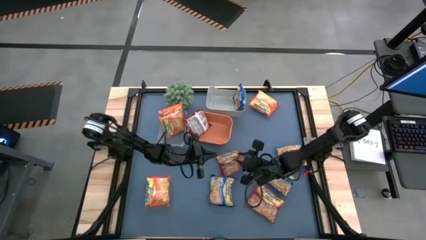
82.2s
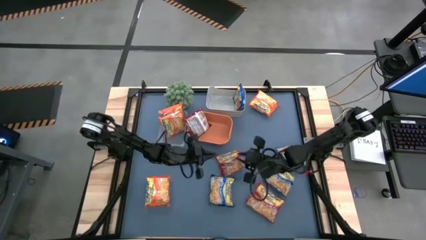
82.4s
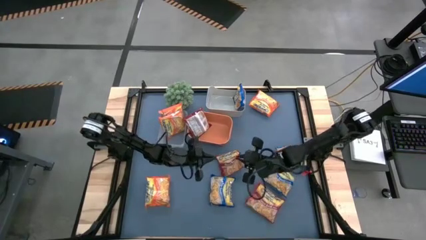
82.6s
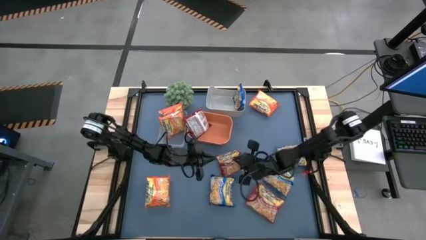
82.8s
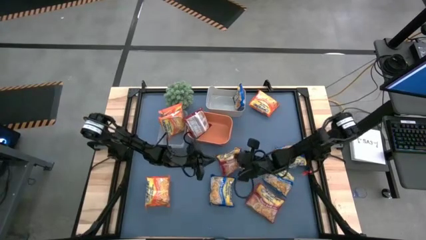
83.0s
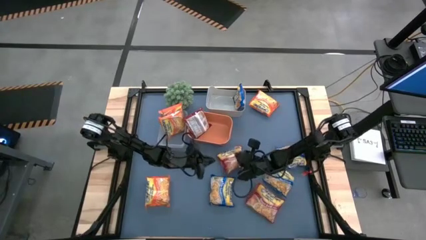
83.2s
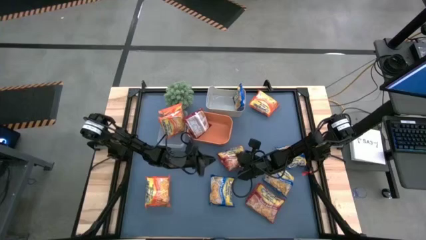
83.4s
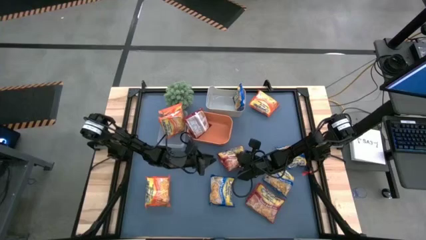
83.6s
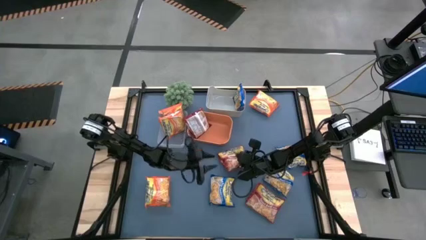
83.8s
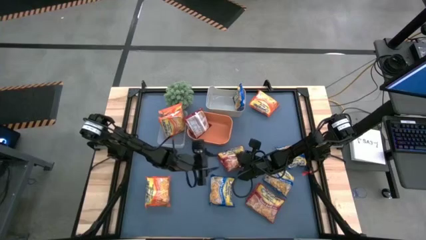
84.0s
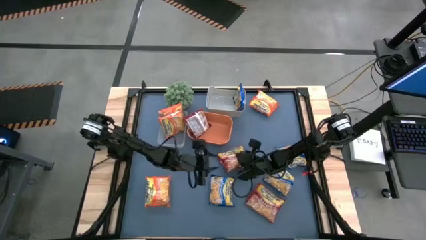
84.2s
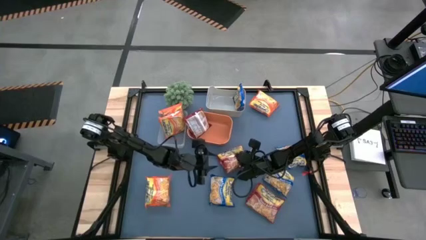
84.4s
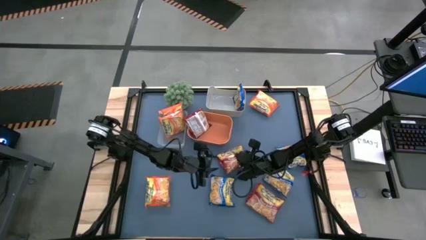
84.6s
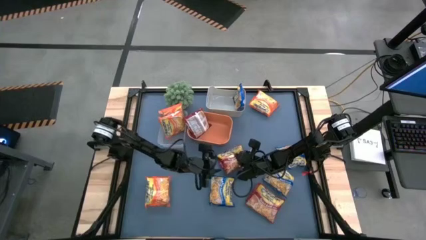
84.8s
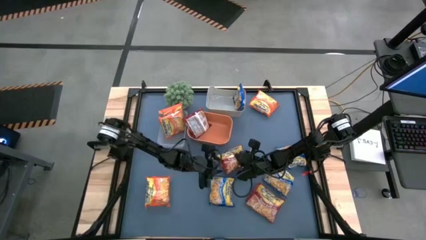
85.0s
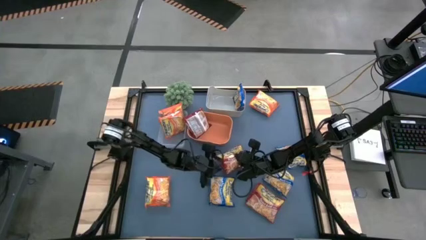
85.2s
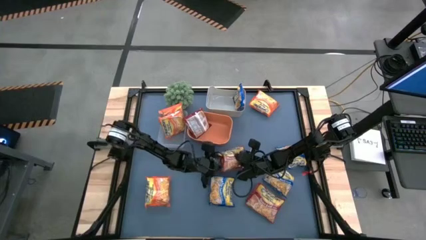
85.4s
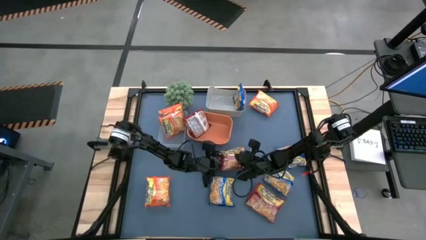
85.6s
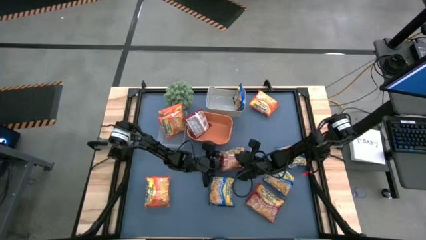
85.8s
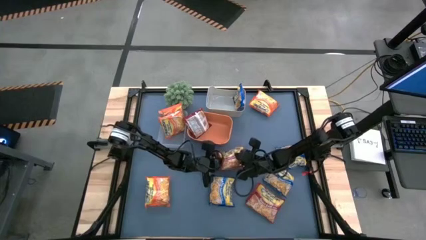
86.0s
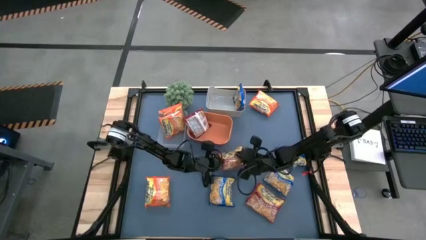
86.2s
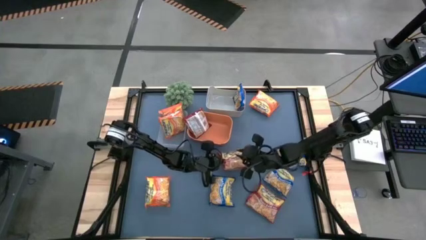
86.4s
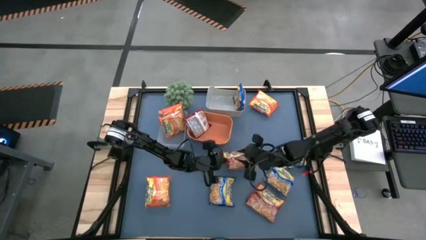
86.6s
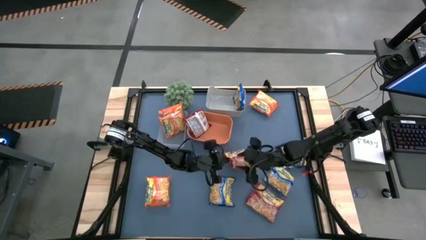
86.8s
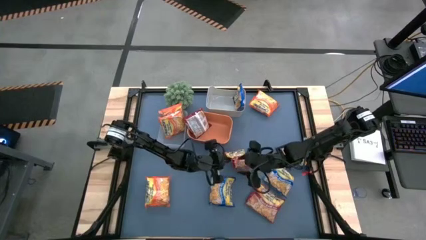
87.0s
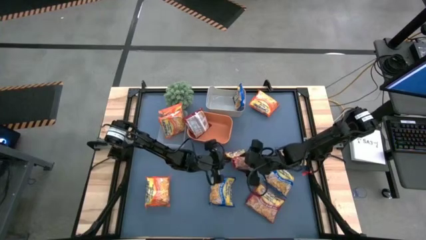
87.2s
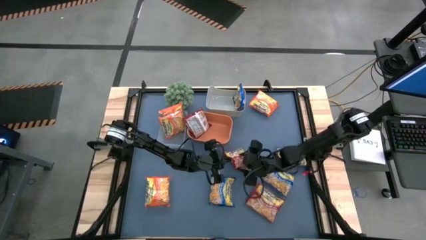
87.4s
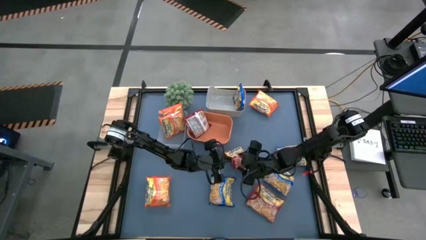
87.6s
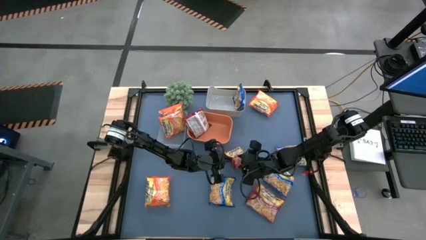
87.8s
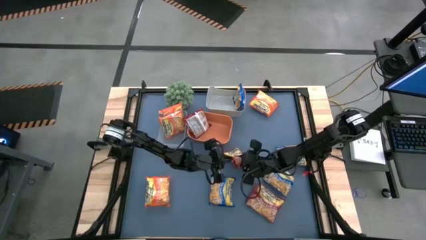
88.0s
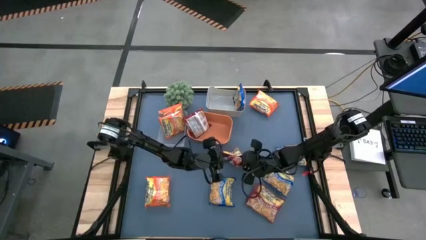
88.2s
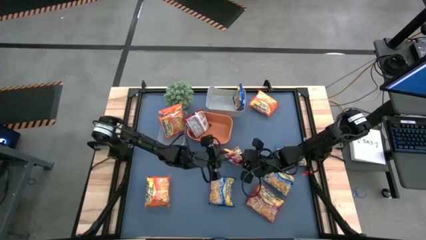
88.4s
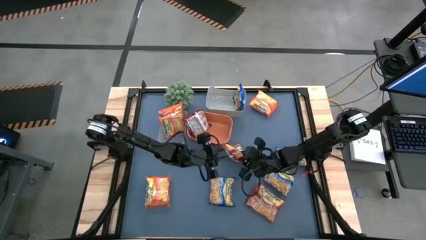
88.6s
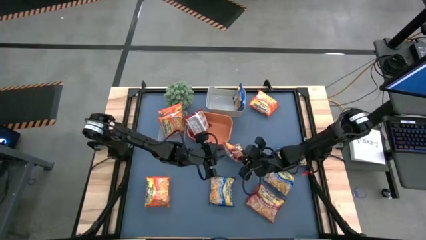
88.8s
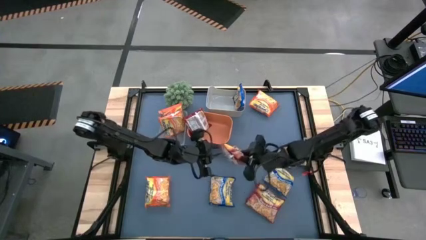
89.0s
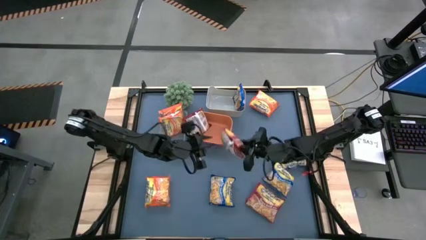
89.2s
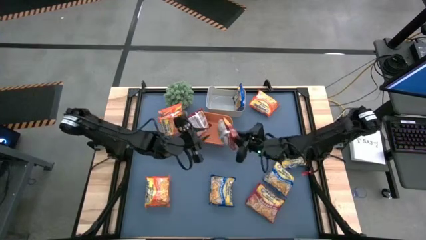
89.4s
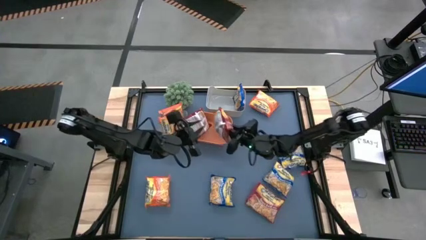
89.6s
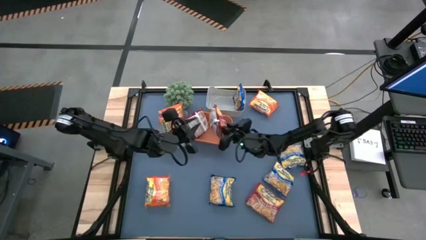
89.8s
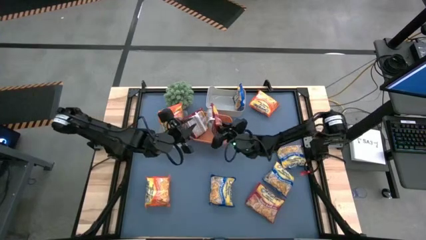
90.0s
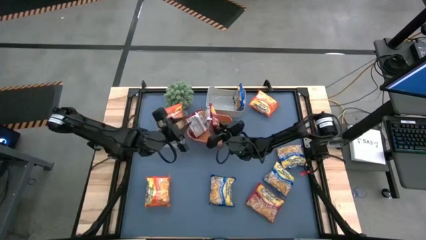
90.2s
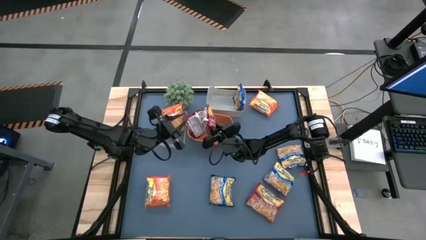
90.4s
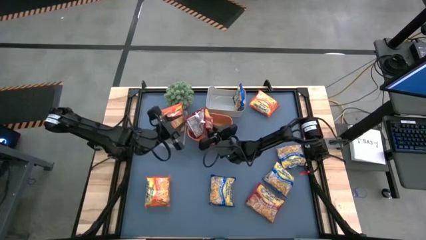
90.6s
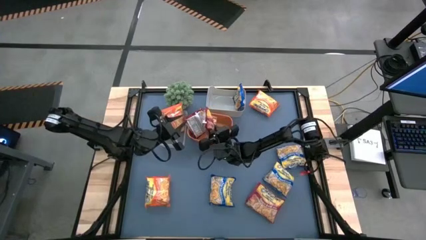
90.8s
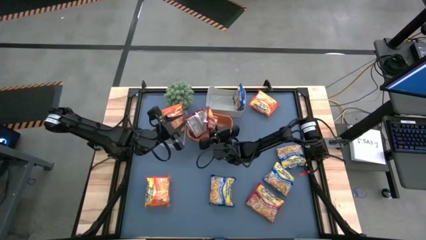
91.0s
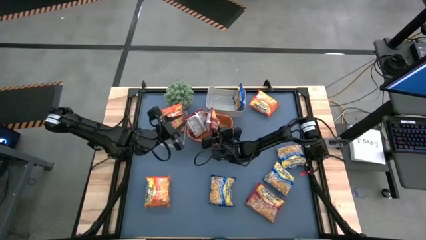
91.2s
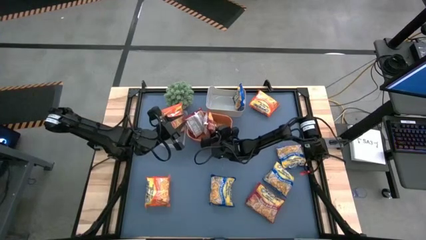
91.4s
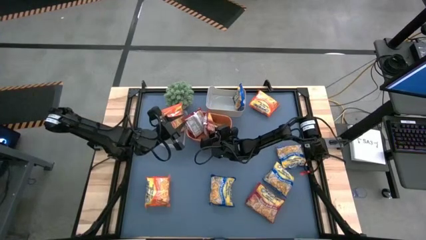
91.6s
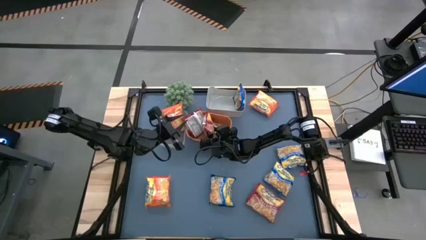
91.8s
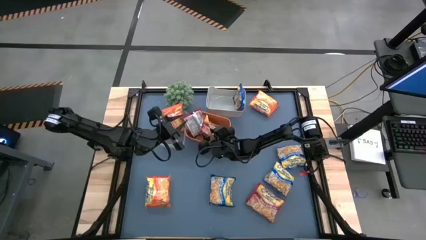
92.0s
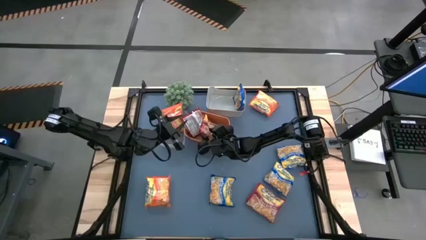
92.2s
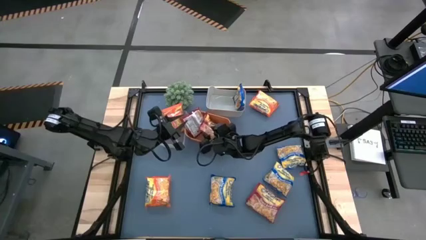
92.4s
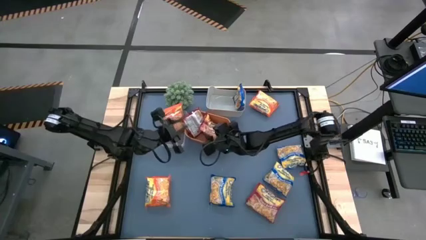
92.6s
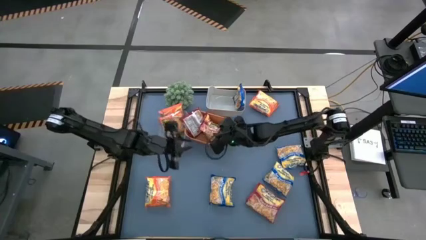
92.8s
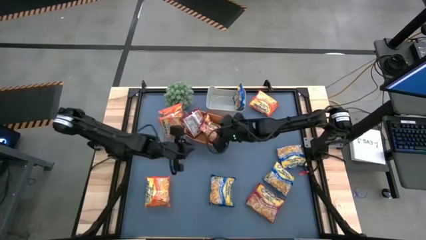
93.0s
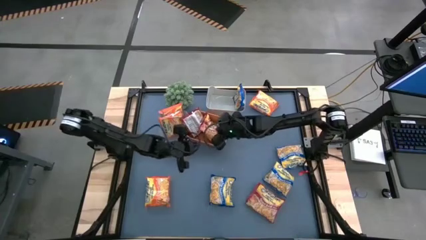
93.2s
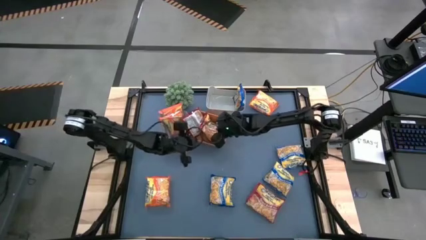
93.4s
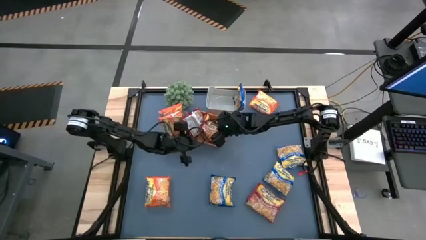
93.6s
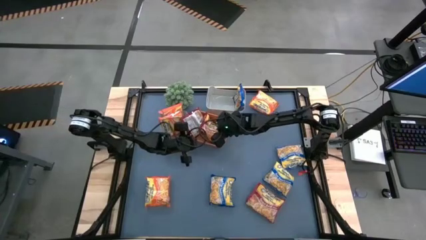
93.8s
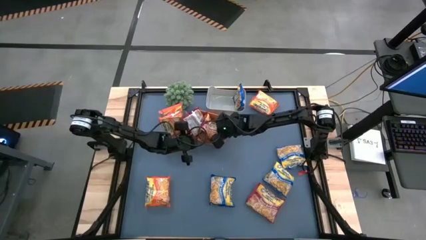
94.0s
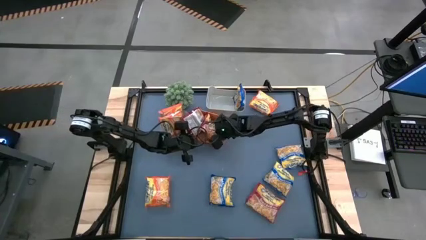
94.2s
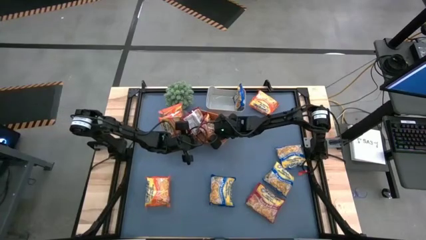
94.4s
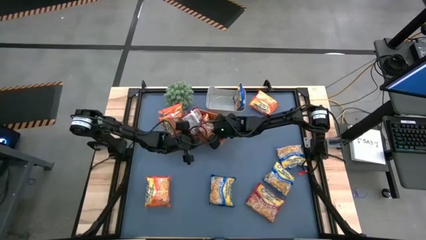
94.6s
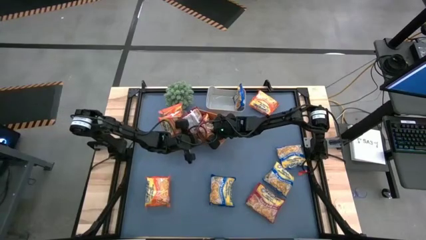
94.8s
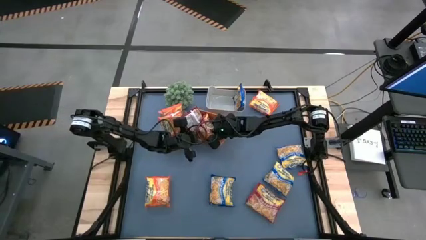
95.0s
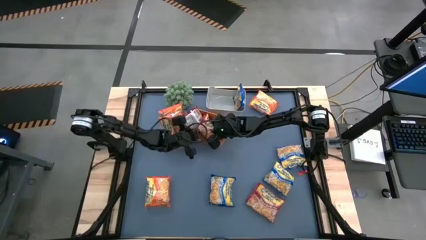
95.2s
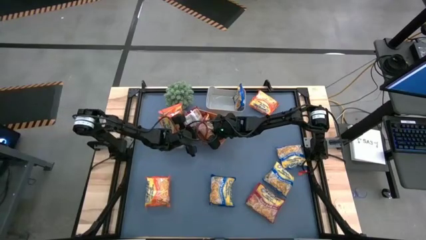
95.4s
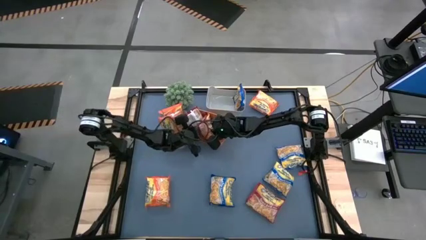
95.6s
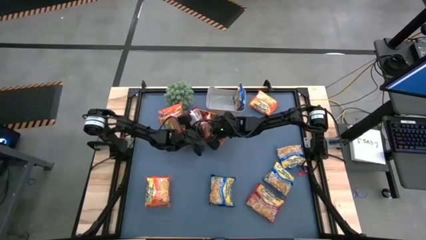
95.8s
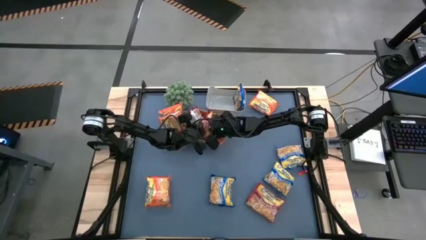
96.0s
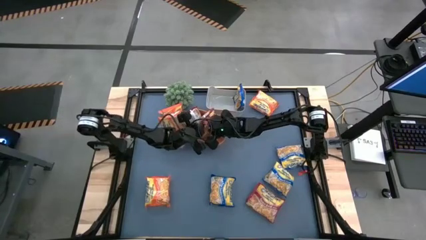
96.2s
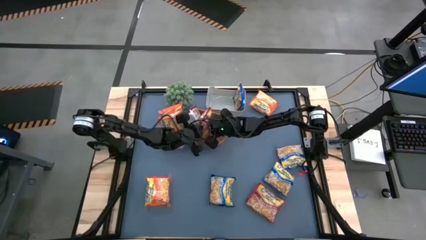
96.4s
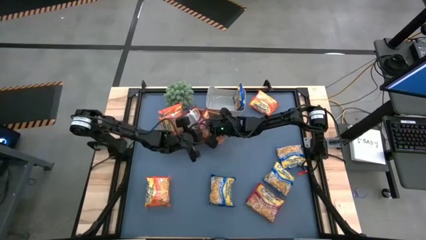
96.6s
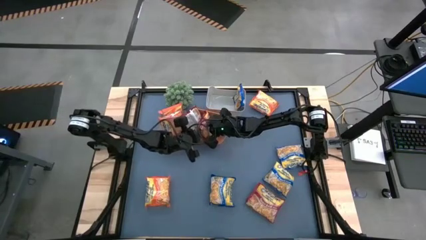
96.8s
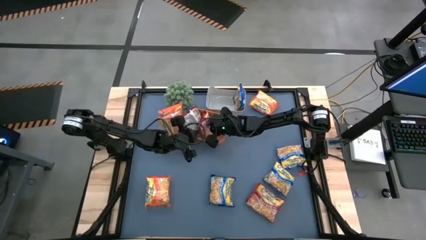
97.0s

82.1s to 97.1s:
Task: Sort Maruchan noodles
Put the red noodle pack into the orange bin

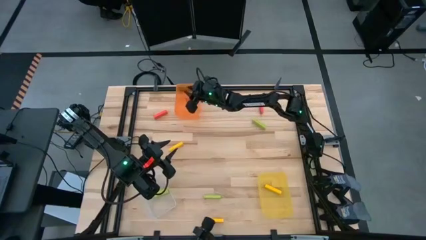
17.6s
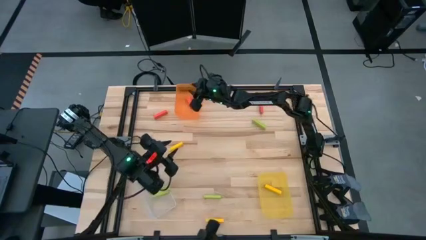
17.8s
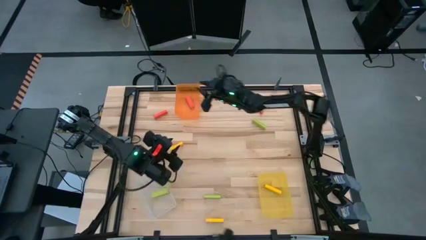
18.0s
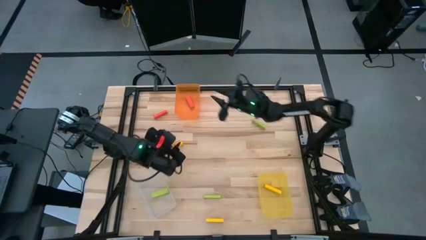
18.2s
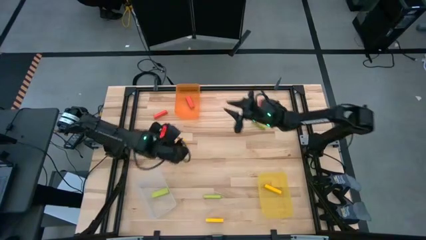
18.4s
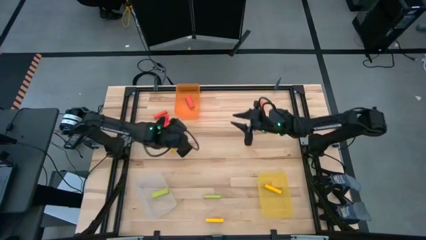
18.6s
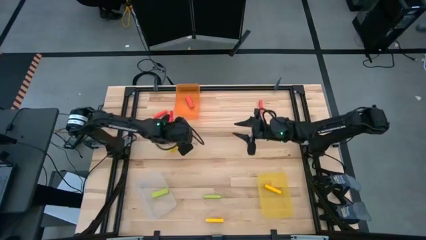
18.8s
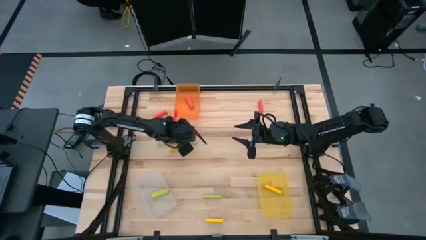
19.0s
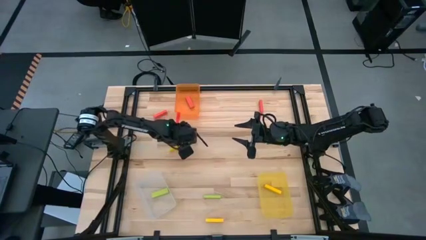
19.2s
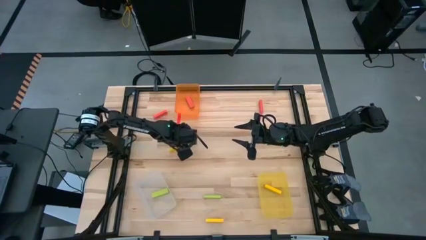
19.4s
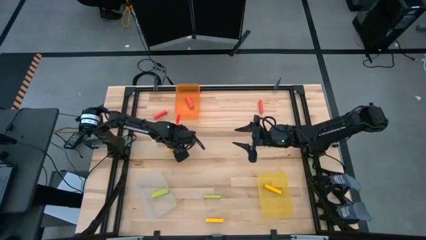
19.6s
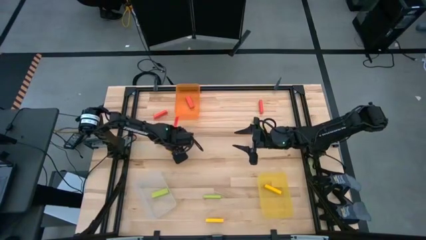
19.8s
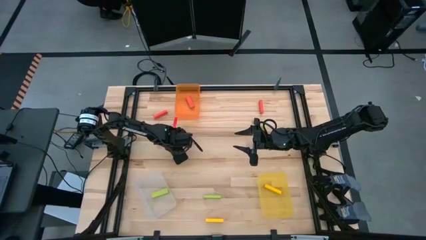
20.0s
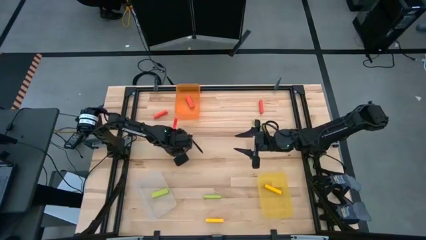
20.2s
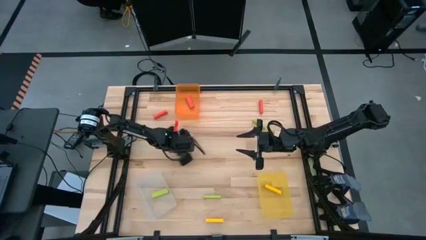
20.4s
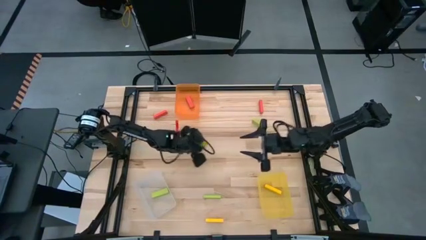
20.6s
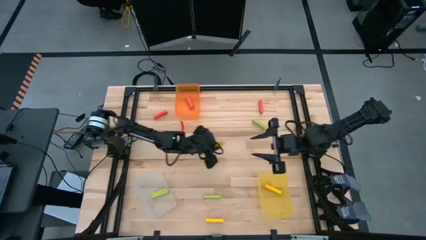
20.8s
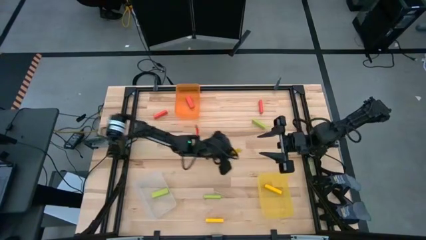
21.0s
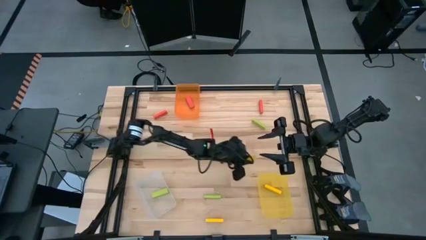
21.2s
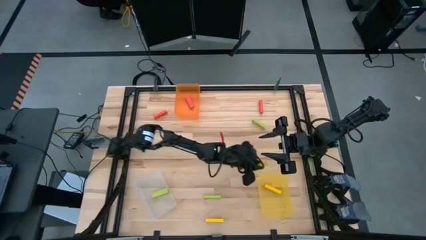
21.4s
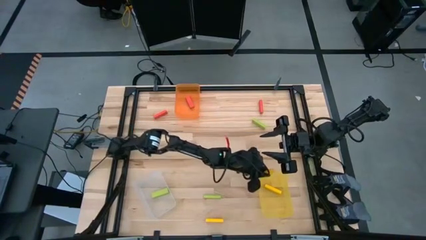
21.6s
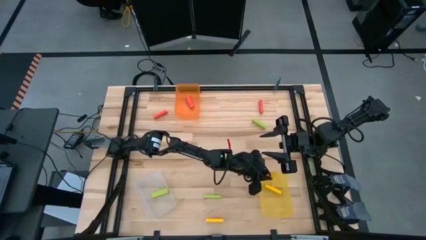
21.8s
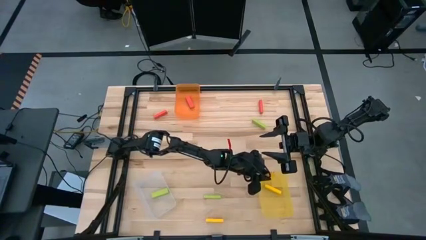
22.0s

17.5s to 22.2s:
Task: Sort blocks
Put the top yellow block into the yellow bin
